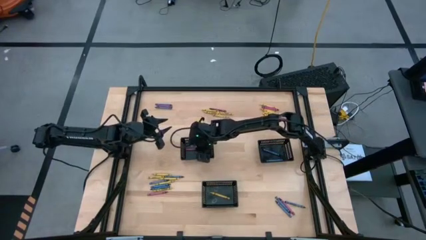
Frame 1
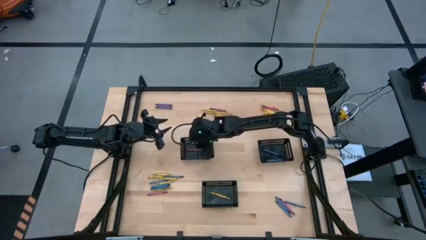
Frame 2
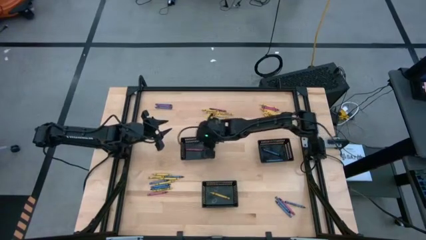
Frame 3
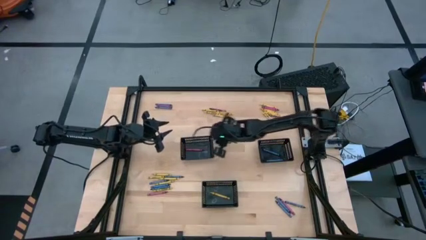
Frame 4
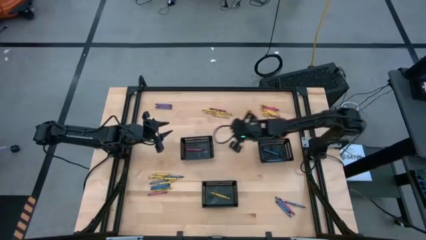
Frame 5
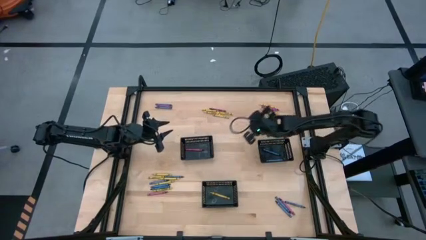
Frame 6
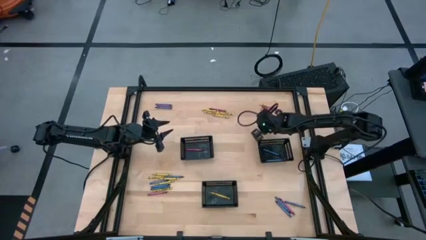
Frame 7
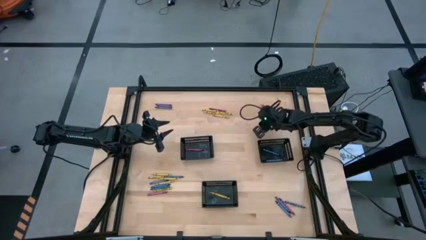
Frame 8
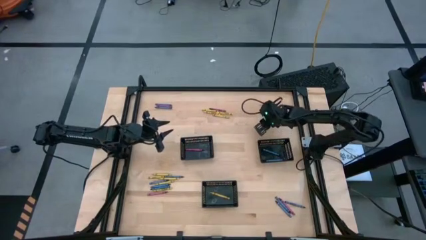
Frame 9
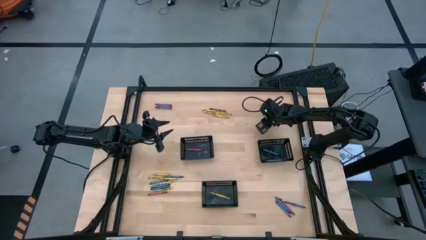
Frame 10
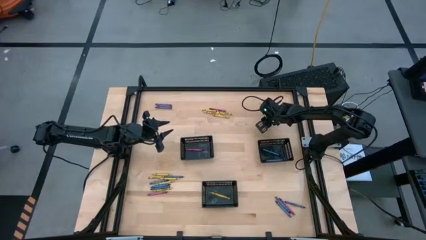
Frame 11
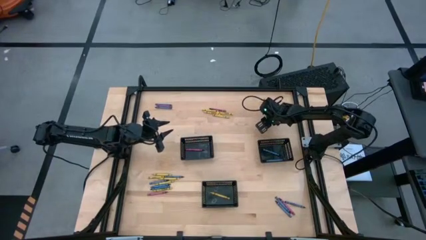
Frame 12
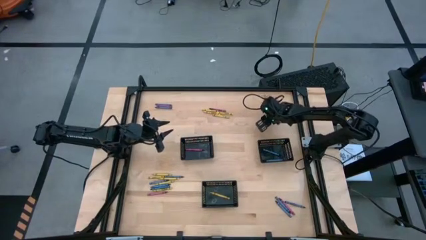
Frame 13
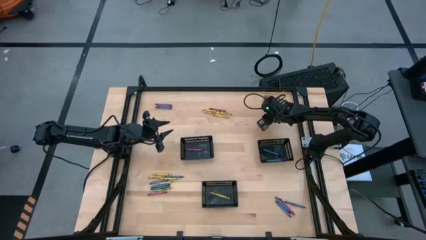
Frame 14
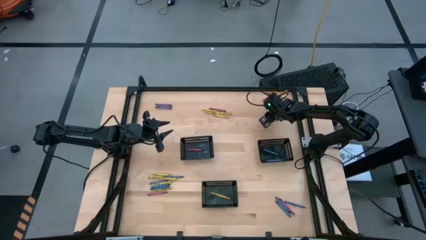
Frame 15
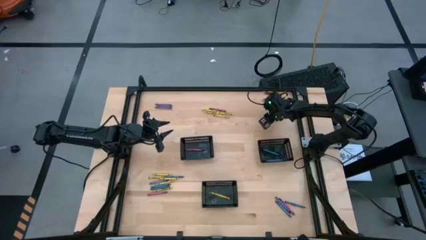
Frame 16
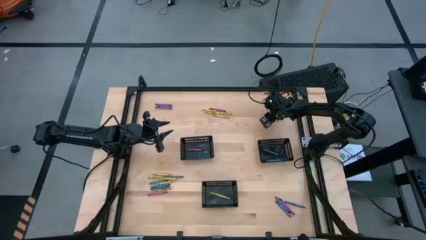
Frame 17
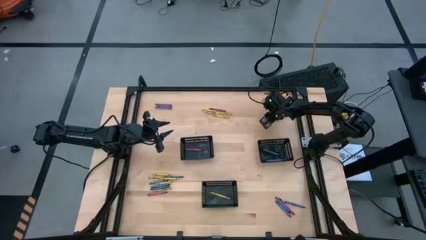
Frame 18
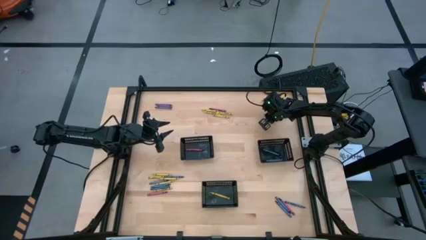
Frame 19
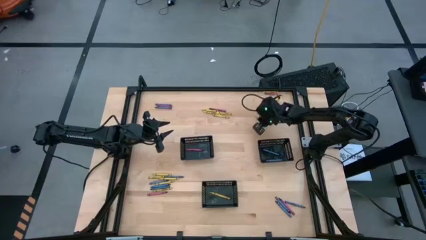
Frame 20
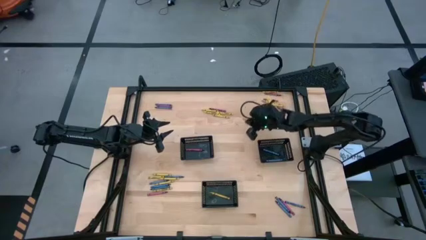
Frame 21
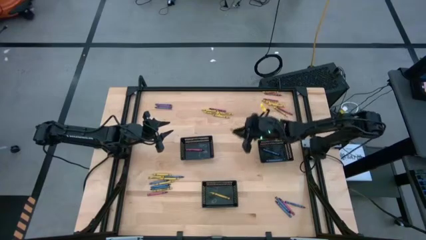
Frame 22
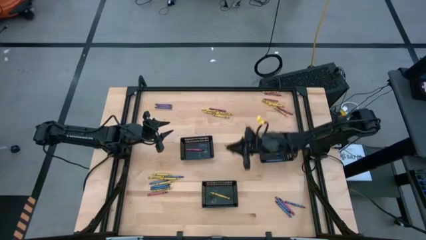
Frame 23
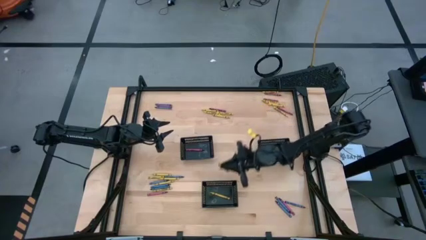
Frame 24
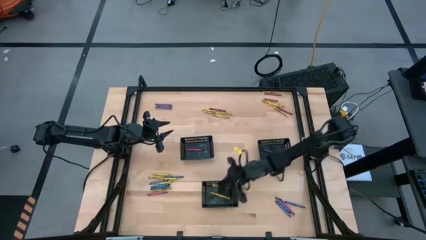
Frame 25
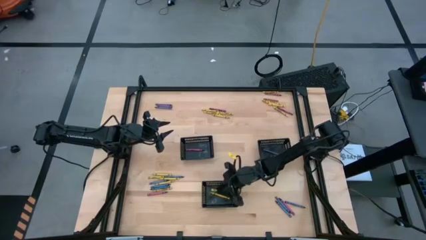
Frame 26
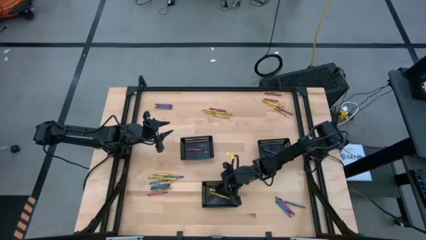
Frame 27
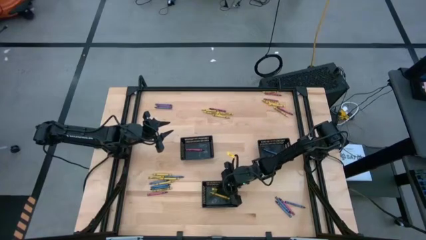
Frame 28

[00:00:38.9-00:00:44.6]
Task: Sort crayons
Put the yellow crayon into the bottom black bin

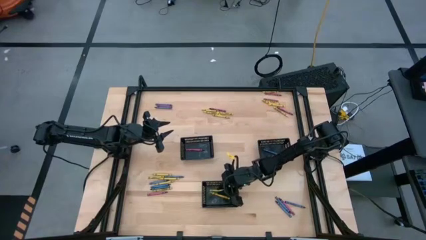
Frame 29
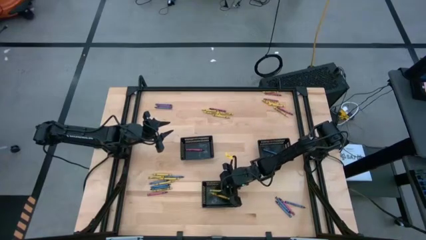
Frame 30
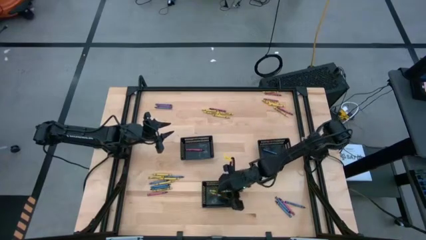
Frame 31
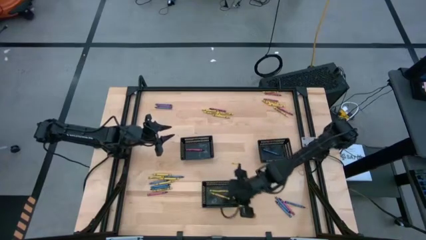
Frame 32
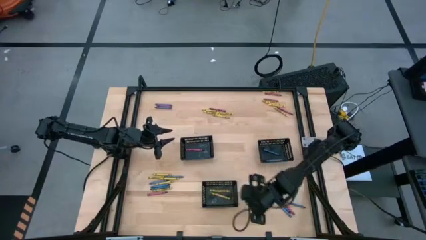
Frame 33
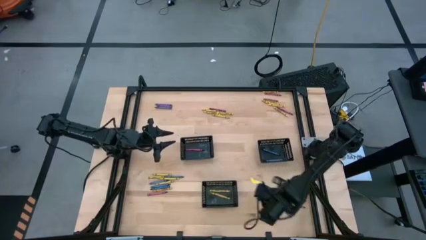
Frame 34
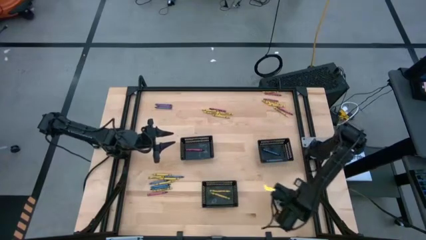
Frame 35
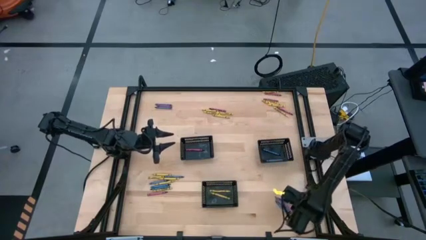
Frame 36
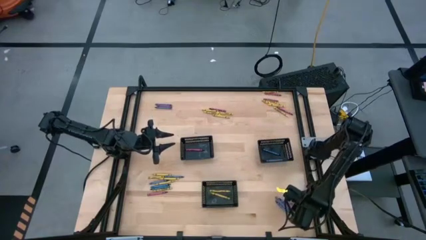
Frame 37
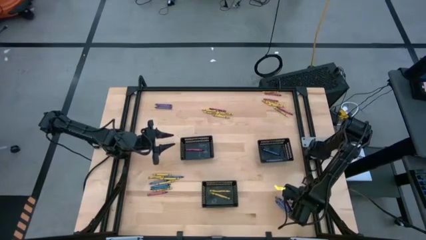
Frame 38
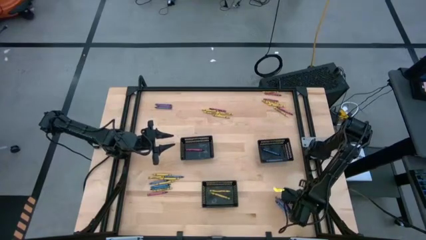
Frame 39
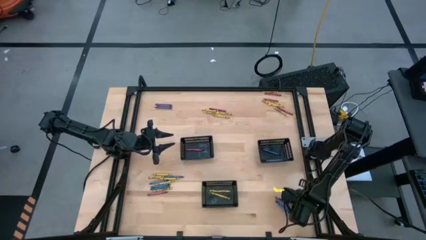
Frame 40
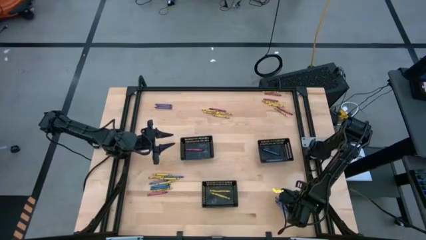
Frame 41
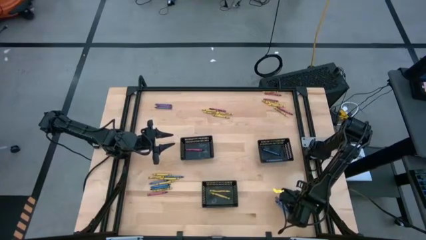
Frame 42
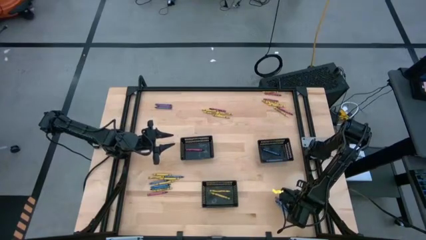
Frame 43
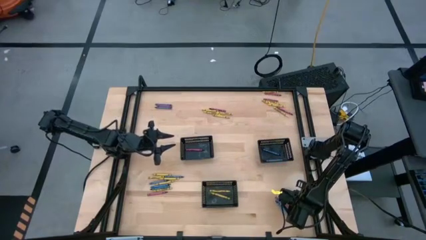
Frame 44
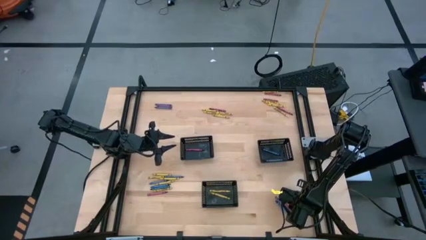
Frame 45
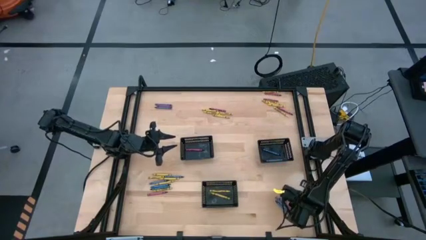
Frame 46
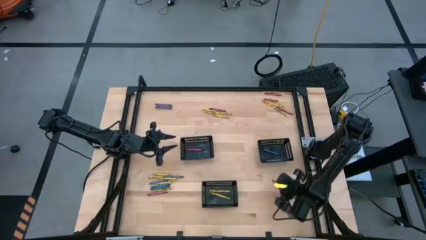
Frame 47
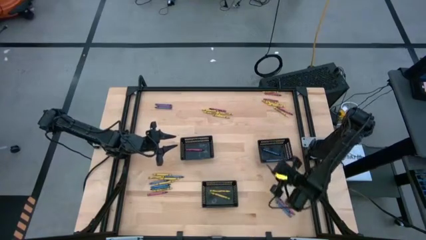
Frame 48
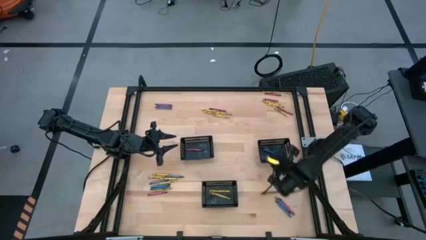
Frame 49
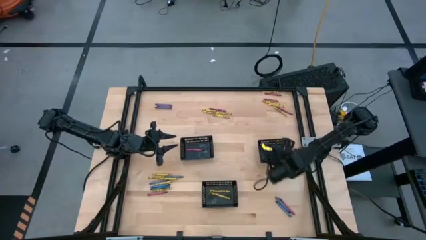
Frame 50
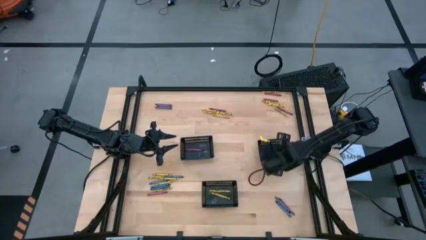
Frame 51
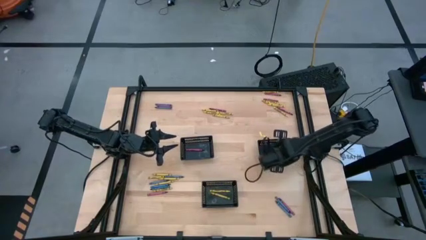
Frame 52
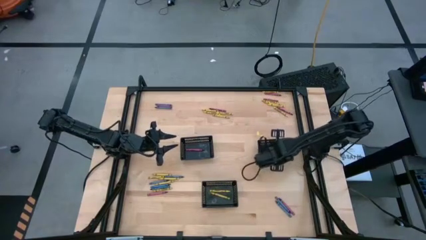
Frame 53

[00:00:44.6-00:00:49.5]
Put the blue crayon into the right black bin

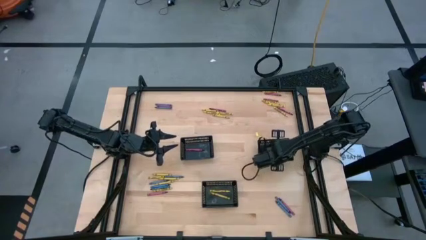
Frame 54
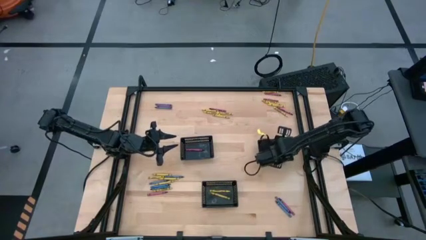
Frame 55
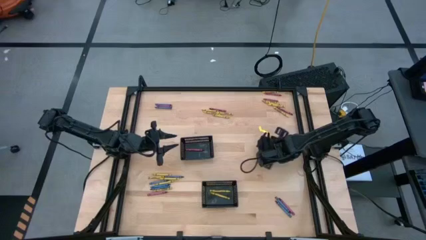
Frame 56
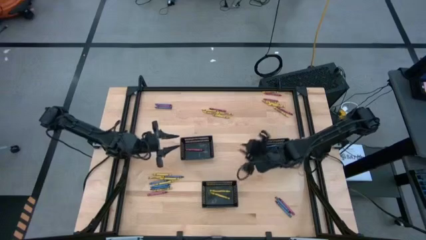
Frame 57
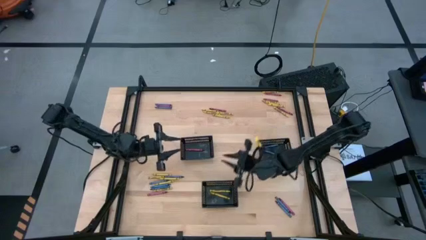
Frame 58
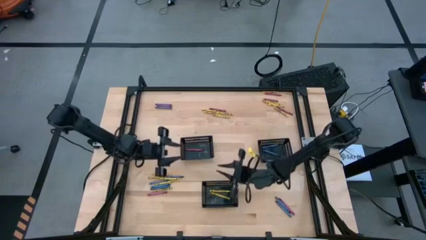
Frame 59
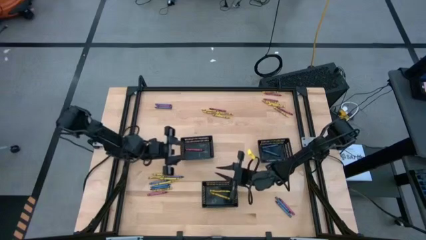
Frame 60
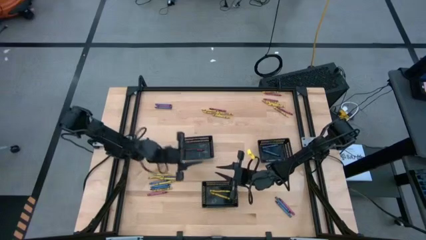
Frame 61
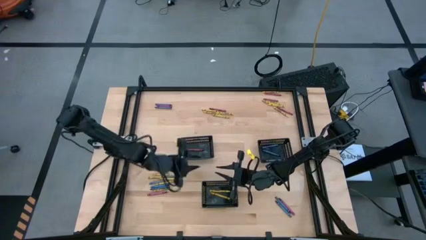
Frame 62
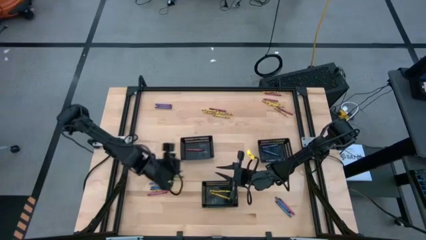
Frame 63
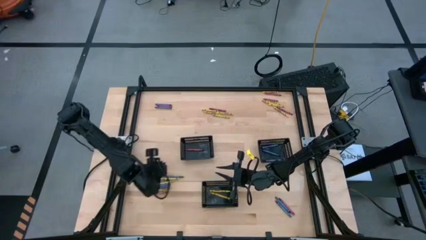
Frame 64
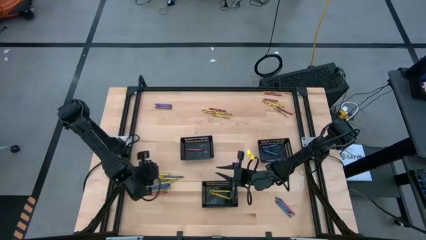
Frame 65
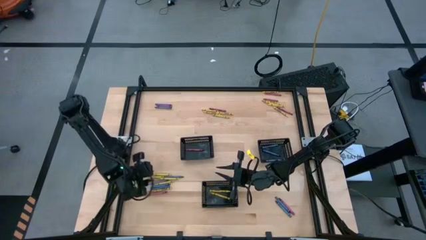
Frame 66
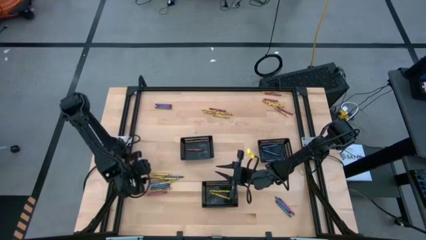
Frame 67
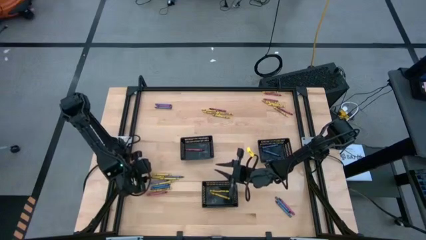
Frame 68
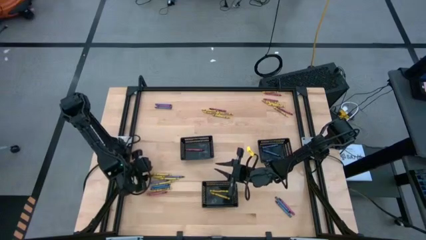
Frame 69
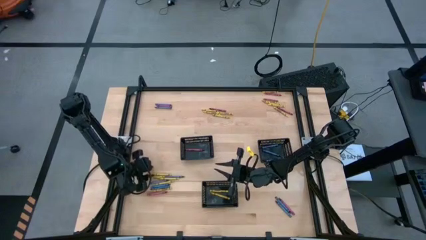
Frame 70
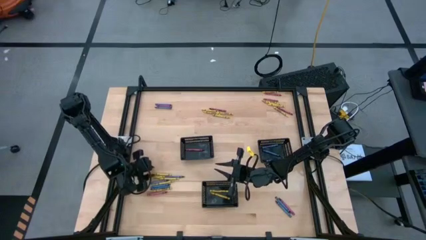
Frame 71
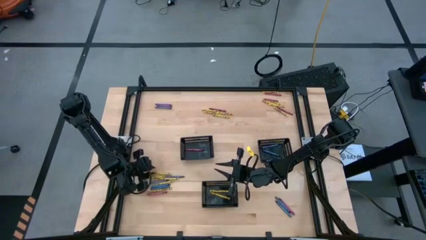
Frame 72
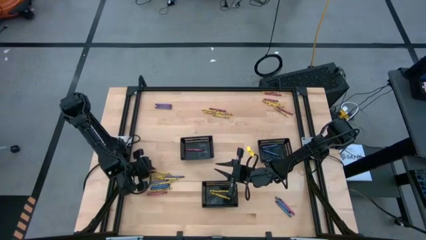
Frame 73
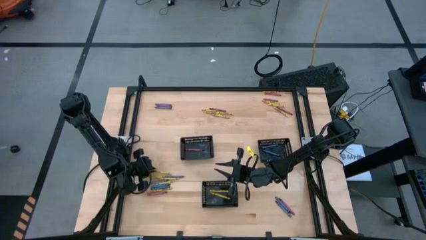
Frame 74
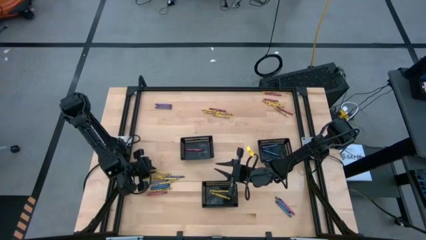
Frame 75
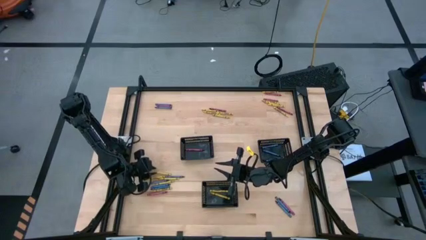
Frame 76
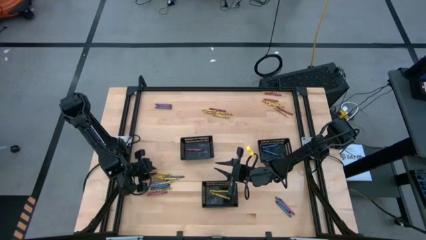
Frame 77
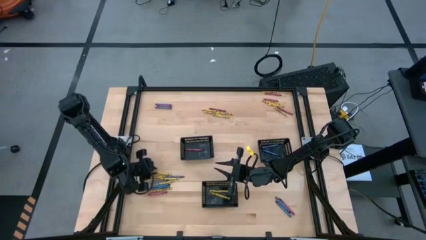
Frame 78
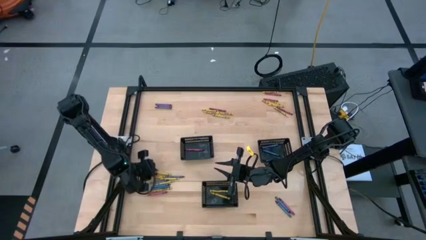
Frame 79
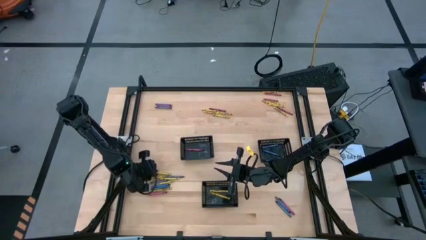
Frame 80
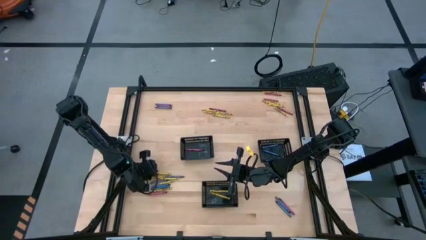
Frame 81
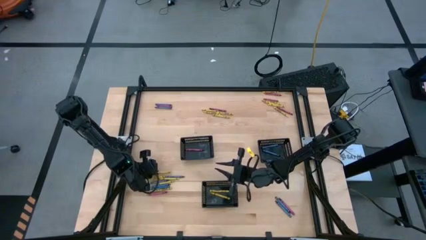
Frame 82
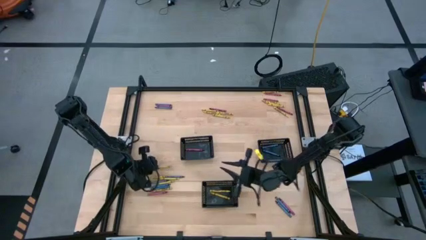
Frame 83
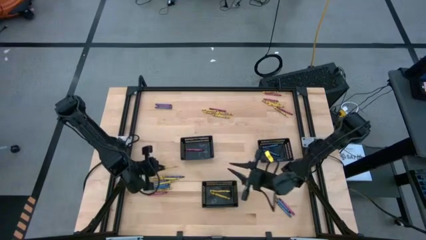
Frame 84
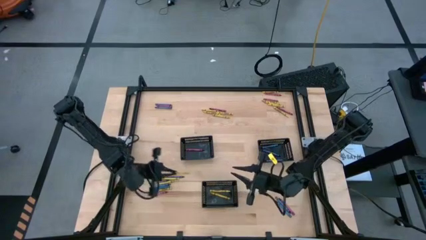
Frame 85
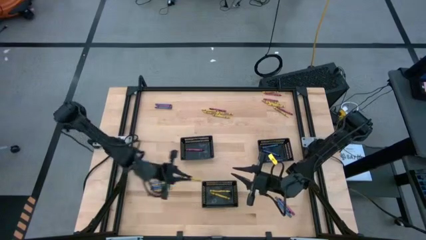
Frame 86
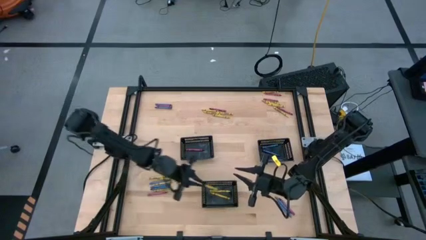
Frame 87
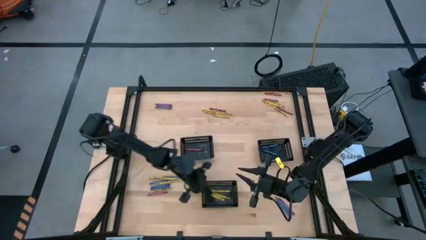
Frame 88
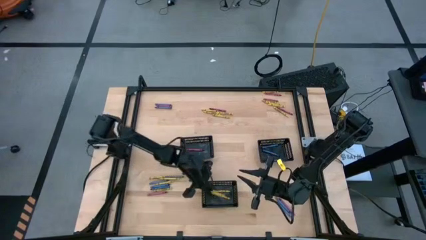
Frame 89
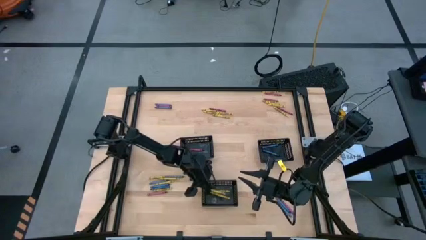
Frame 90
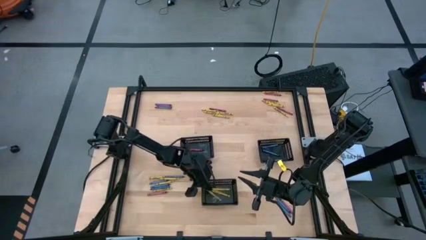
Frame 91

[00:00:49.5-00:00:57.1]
Put the yellow crayon into the bottom black bin
